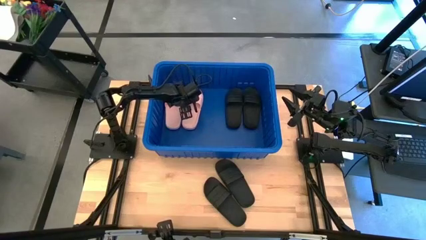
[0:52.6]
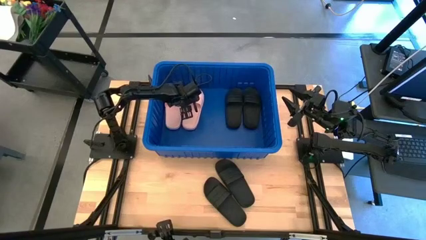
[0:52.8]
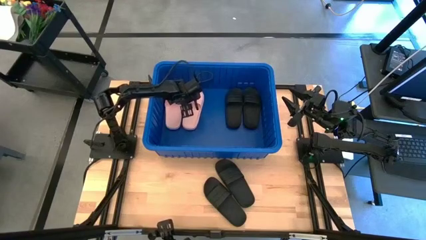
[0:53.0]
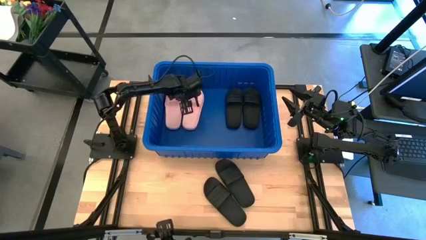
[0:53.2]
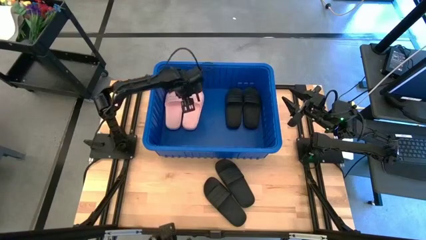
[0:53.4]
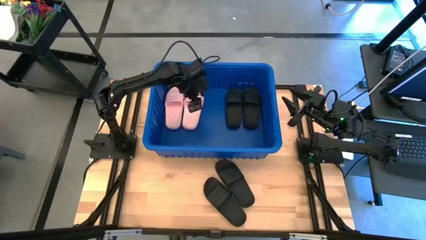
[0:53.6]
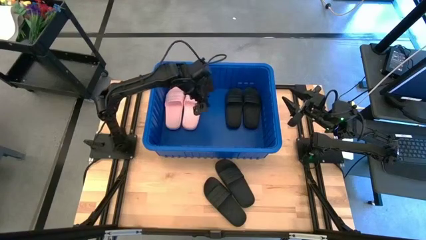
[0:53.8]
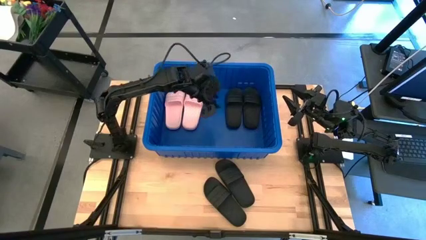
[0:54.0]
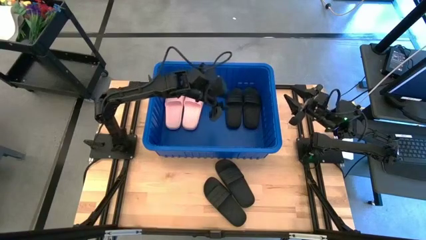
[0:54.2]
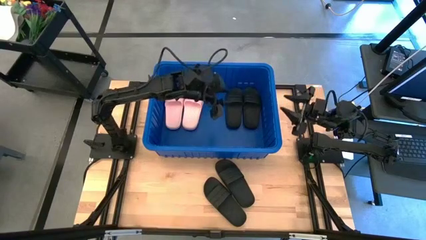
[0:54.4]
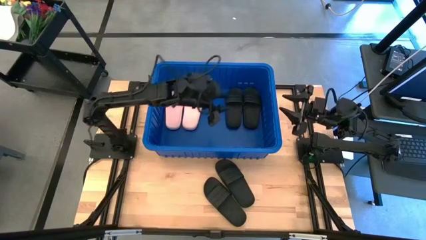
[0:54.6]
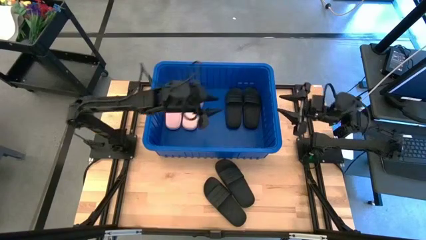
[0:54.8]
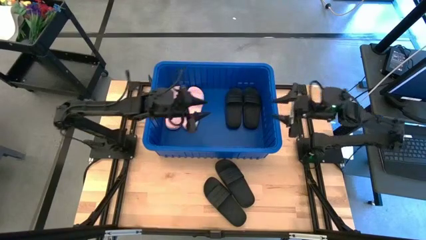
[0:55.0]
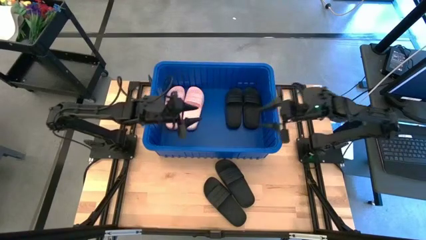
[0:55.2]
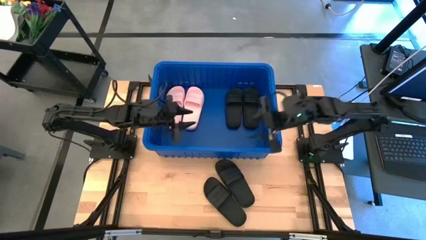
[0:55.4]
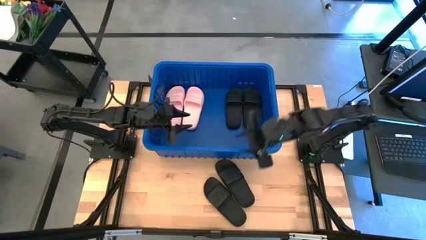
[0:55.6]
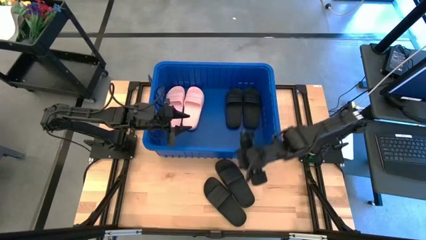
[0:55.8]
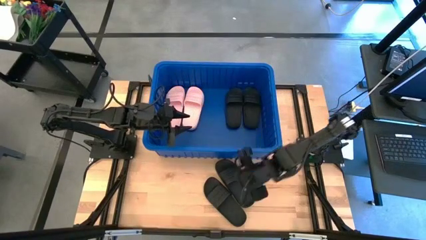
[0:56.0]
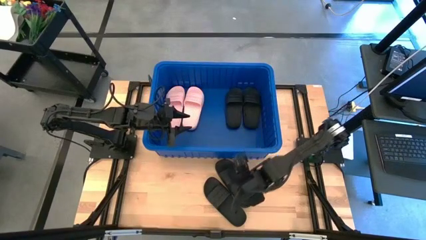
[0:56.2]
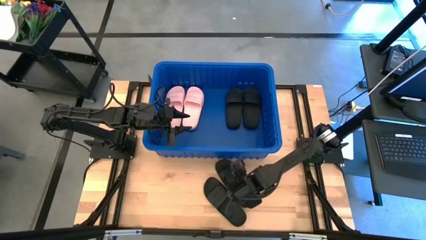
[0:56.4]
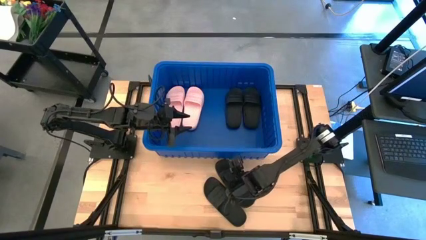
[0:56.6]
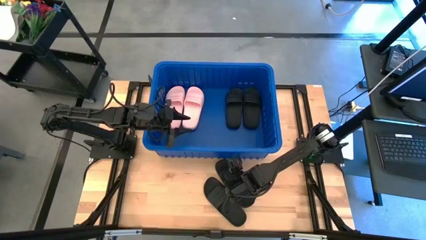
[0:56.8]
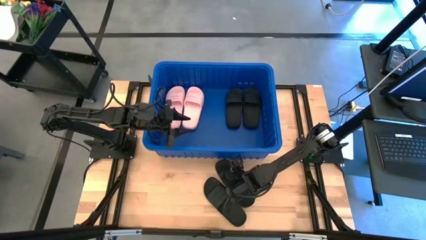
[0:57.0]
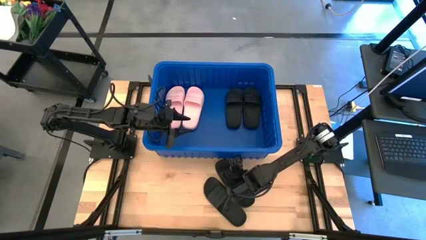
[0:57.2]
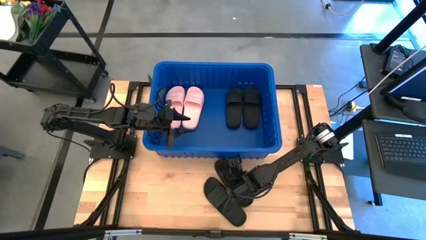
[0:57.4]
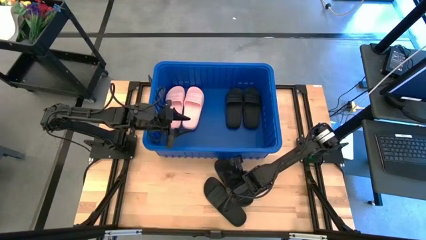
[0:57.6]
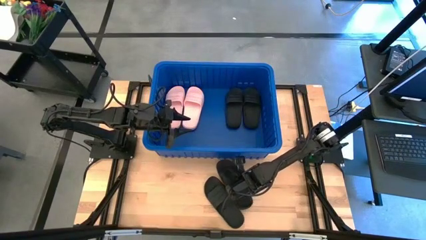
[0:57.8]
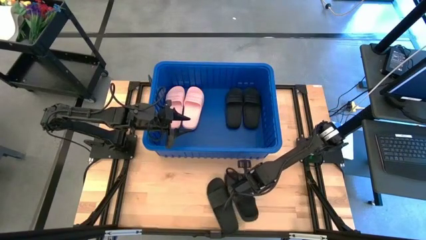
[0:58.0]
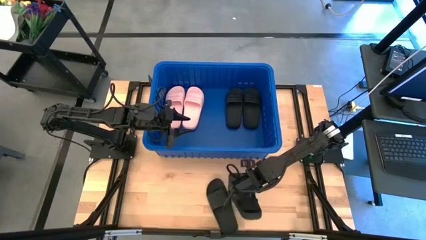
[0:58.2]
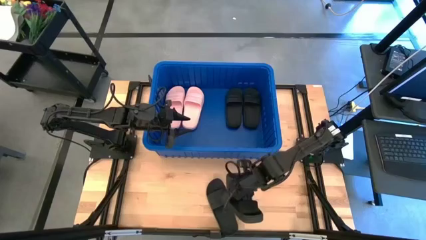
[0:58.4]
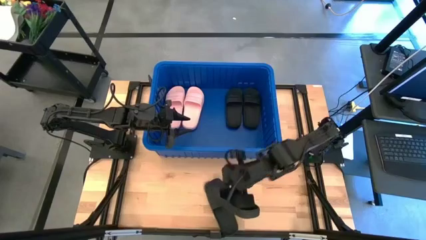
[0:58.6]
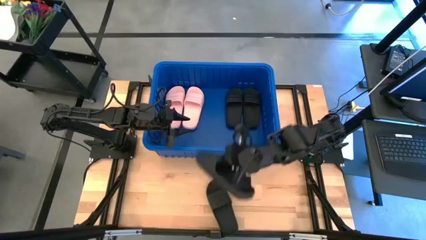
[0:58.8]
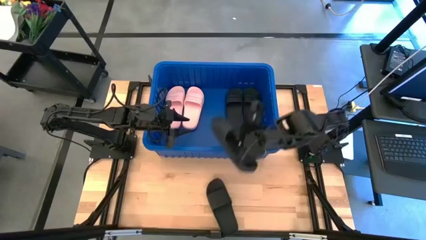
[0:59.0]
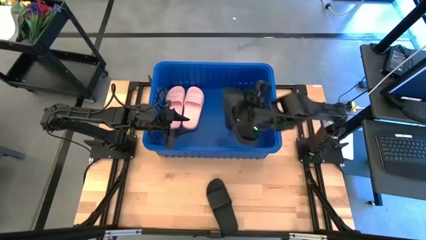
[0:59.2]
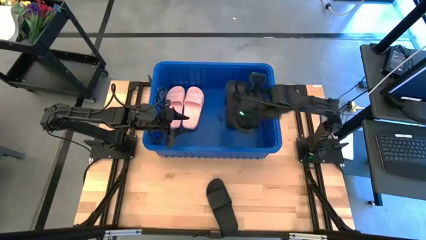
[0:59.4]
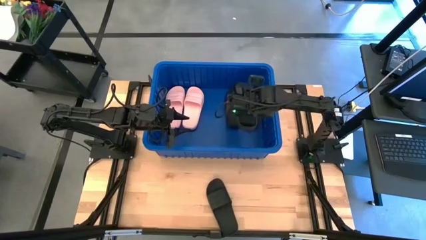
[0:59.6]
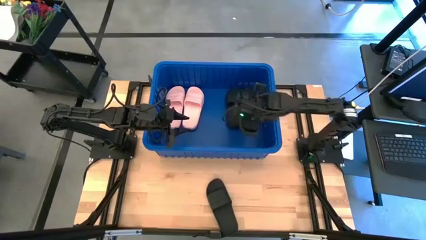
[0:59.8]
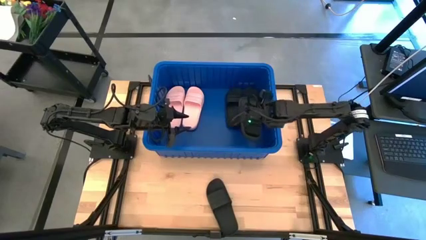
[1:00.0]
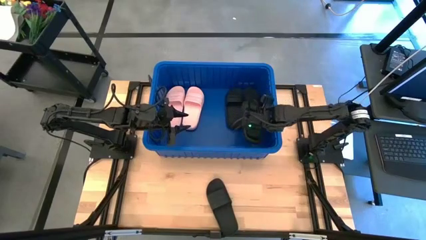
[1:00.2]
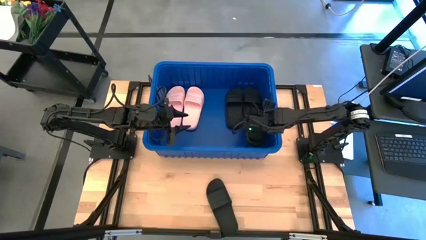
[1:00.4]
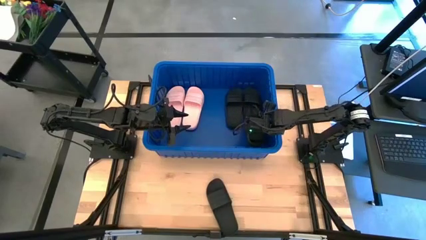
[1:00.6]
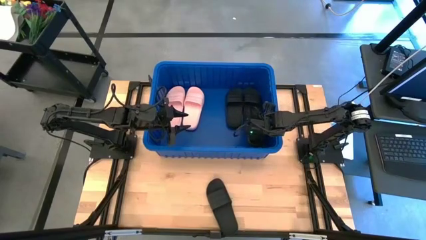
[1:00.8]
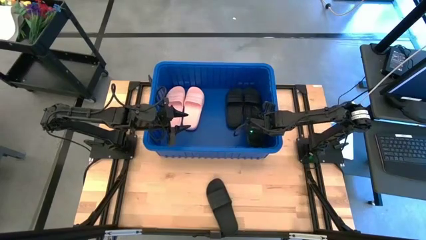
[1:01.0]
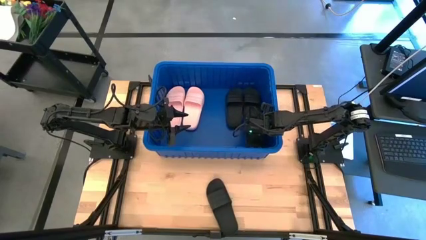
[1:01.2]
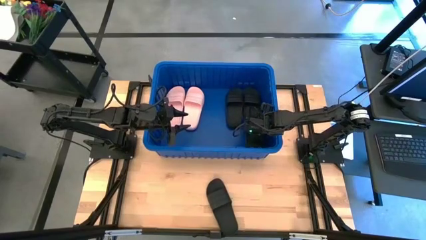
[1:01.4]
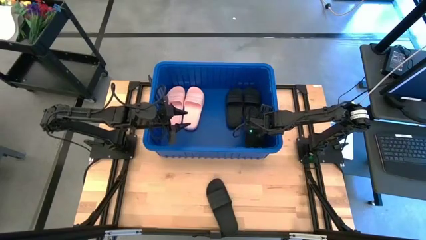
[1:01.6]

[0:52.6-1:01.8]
Task: Pick and place slides into bin
Put the black slide into the blue container

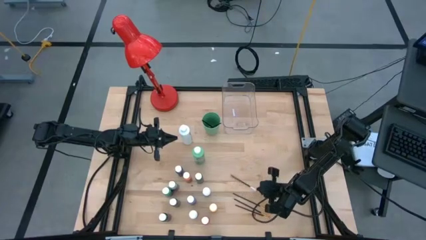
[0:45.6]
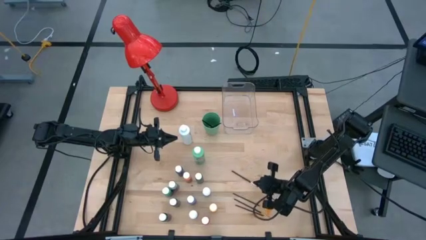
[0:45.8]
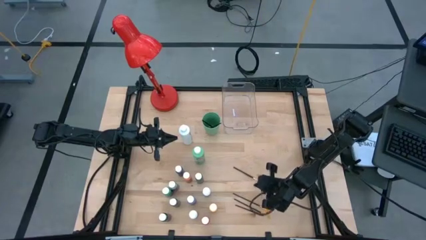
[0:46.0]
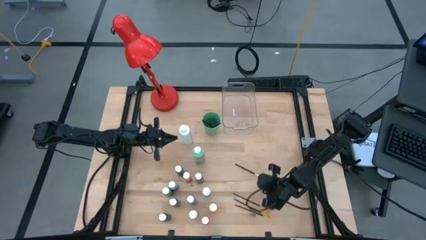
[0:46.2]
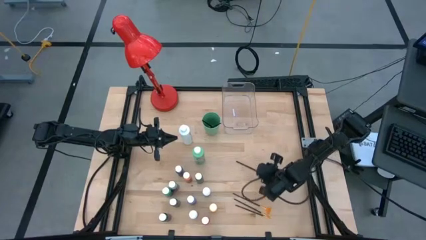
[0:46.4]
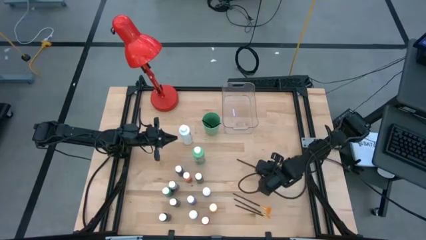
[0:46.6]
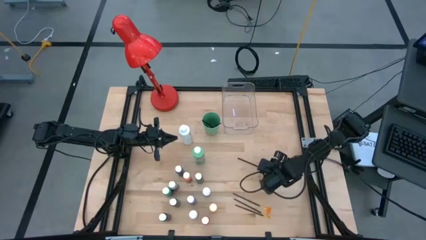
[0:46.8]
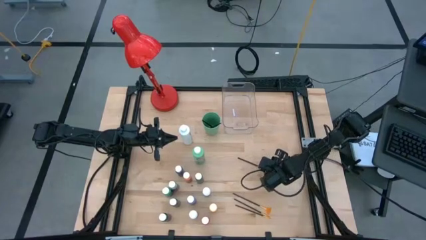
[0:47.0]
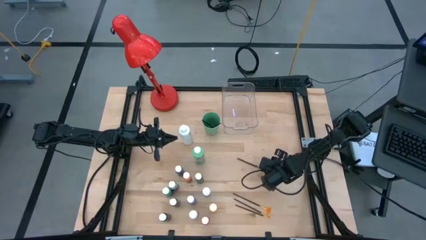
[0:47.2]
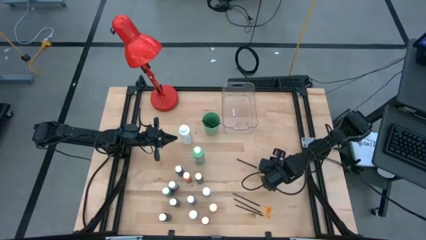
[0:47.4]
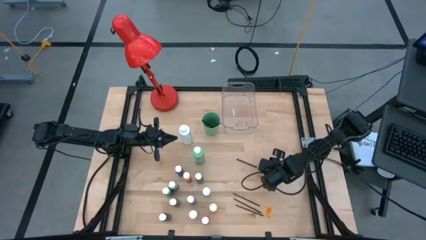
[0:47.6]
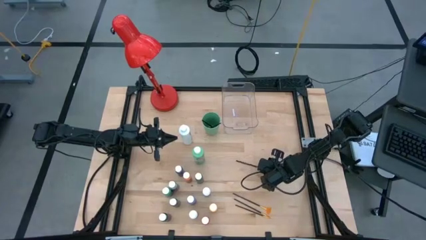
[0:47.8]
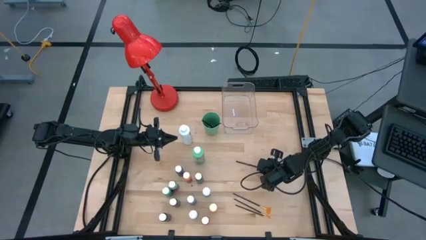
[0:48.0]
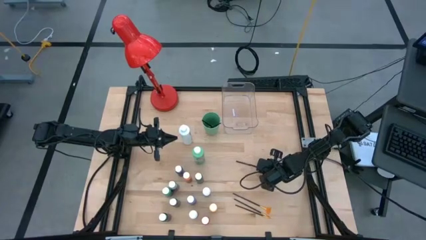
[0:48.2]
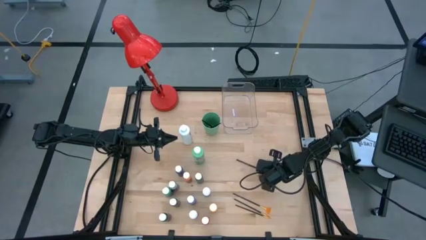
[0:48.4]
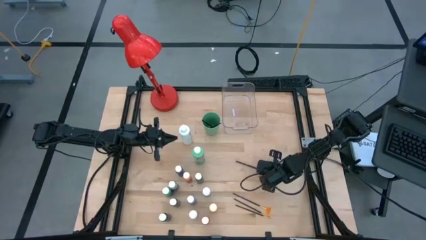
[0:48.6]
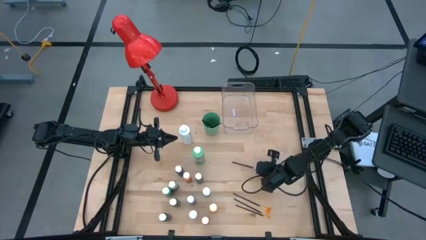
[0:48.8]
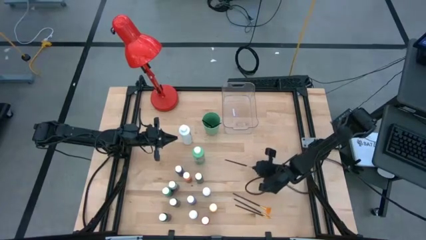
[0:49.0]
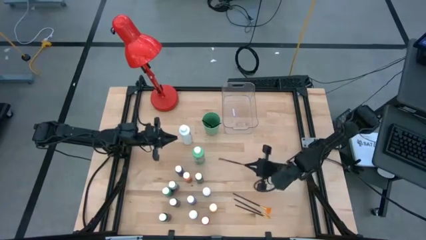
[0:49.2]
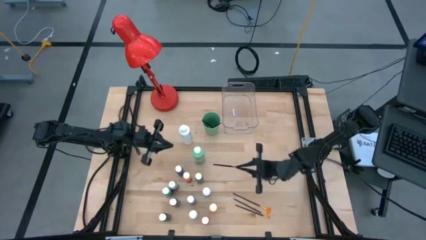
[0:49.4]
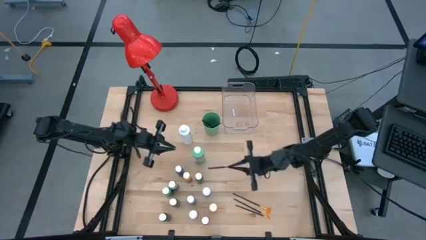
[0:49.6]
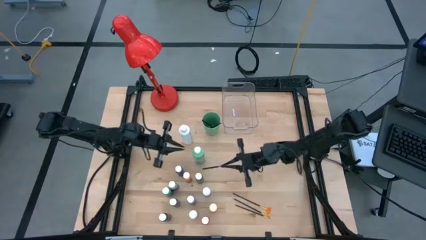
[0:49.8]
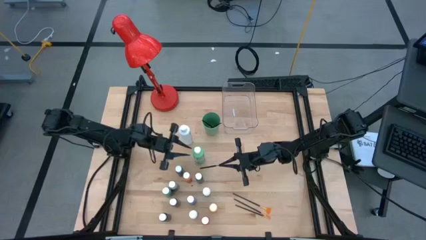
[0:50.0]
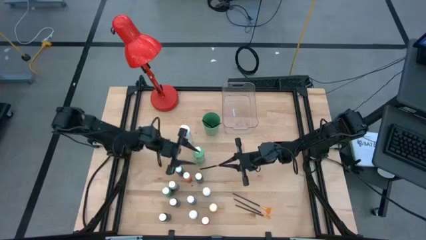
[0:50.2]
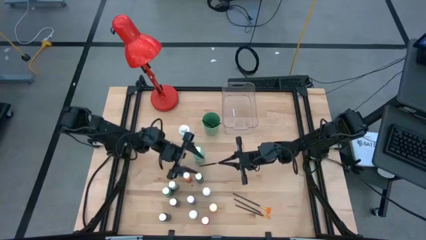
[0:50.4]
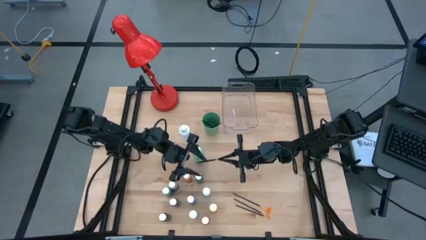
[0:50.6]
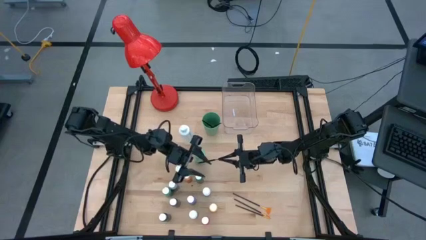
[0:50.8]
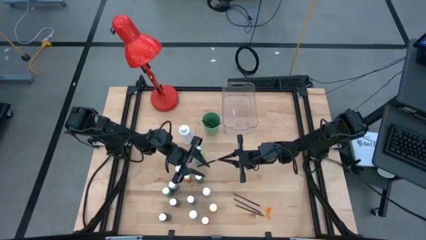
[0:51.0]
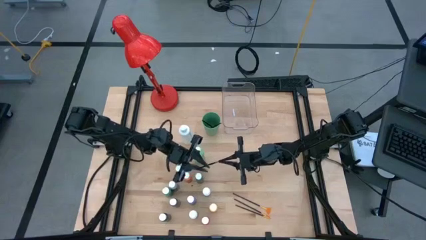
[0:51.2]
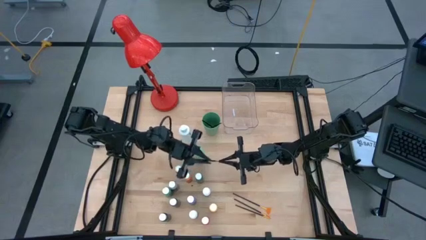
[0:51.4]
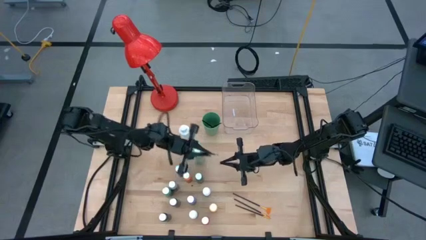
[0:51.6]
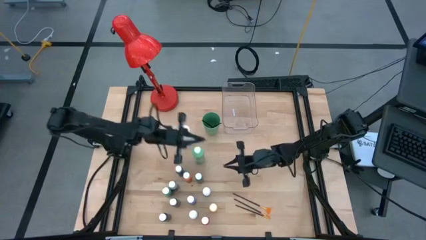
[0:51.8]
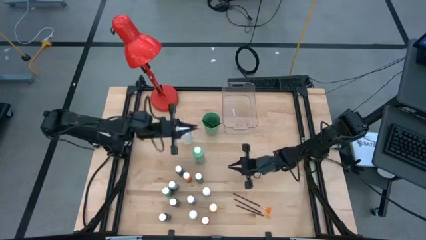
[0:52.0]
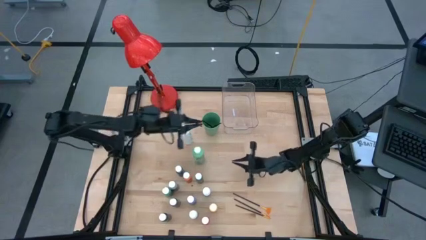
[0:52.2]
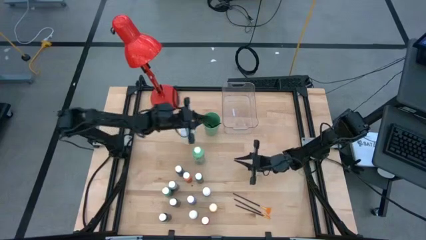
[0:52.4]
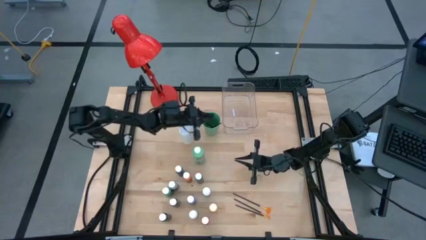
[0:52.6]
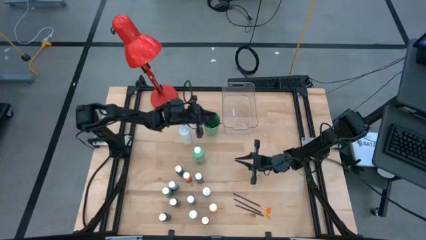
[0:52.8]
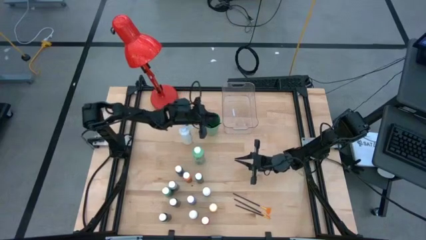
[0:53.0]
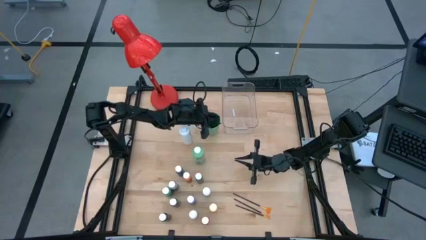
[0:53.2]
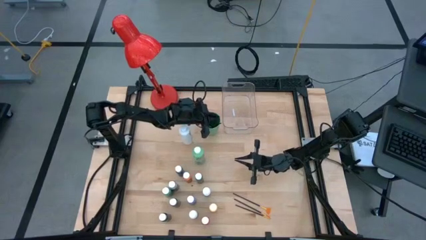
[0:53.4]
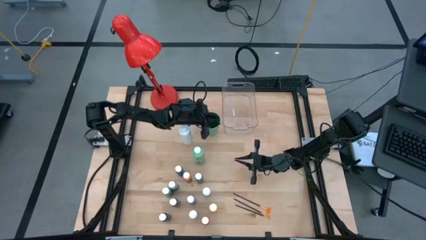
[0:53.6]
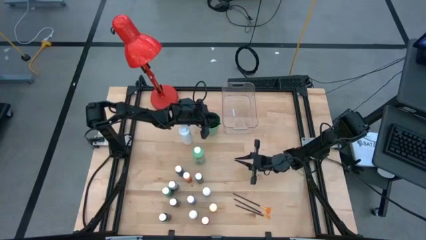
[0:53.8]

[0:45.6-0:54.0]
Task: Pick & Place Paint Supplies
Put the silver paint brush into the green cup
